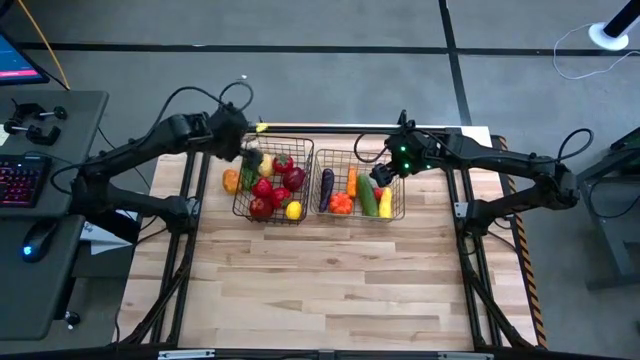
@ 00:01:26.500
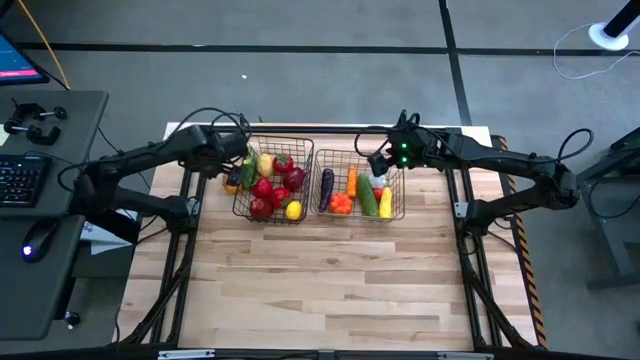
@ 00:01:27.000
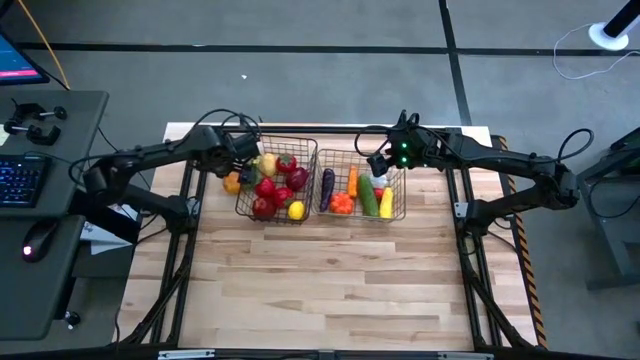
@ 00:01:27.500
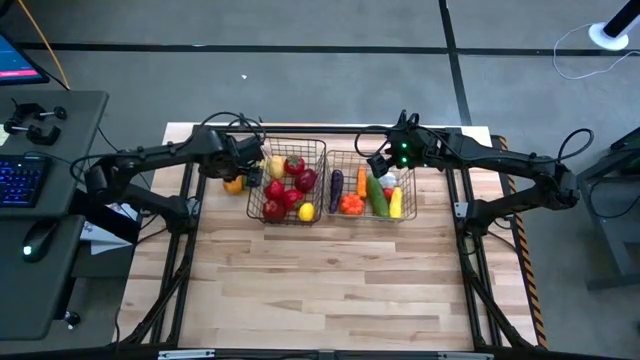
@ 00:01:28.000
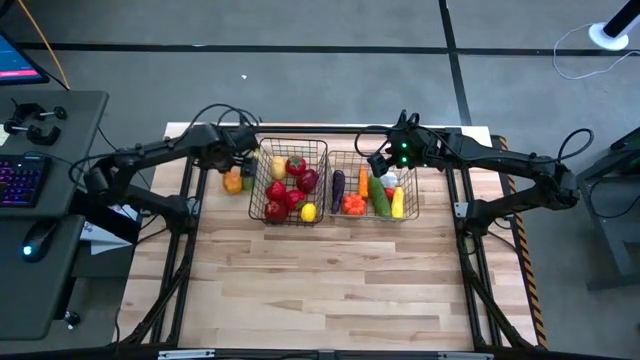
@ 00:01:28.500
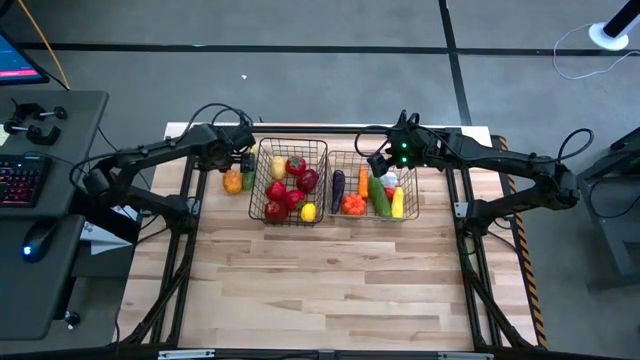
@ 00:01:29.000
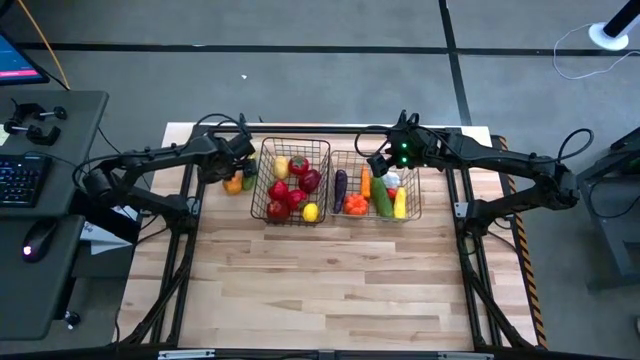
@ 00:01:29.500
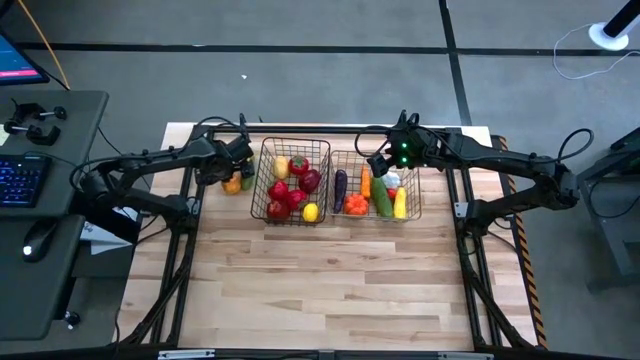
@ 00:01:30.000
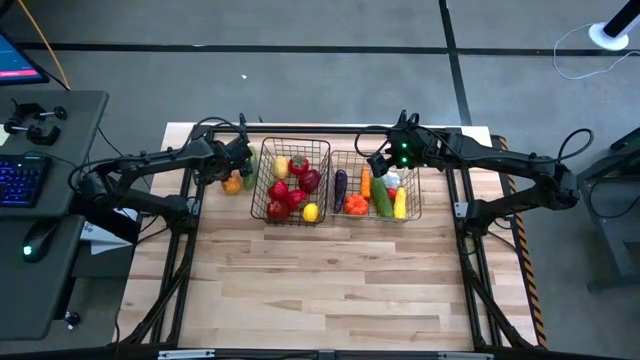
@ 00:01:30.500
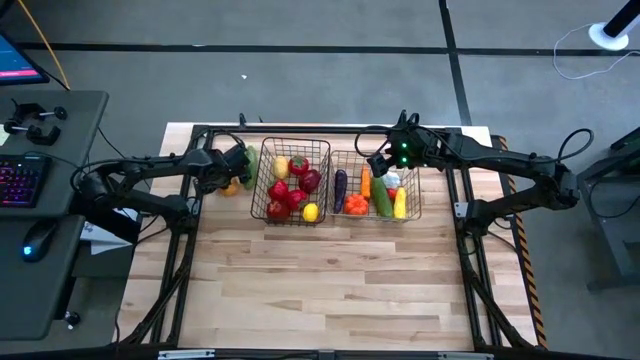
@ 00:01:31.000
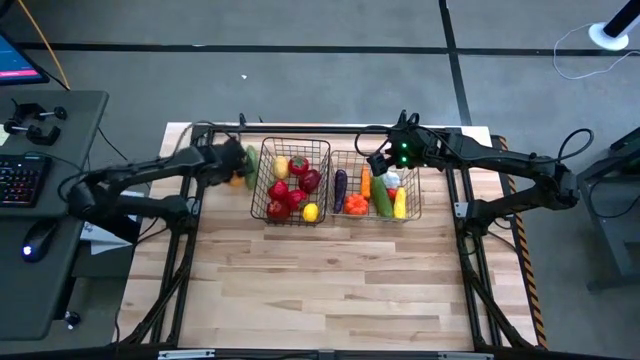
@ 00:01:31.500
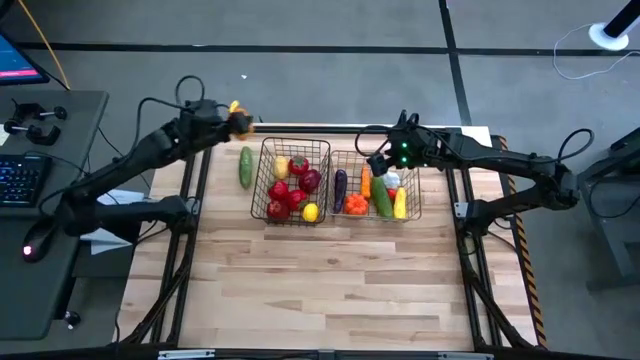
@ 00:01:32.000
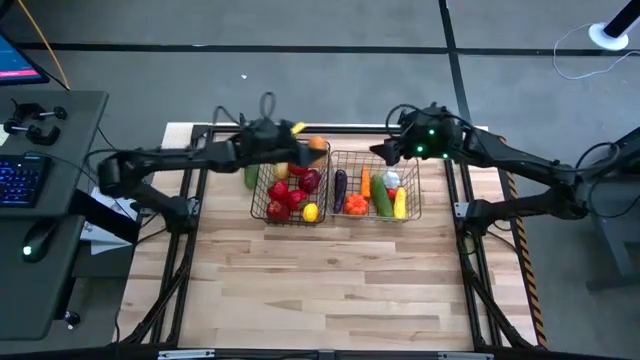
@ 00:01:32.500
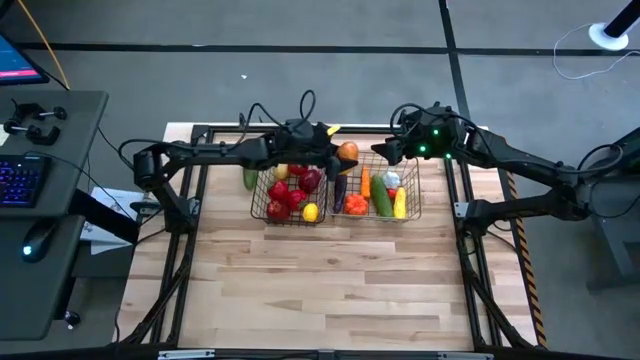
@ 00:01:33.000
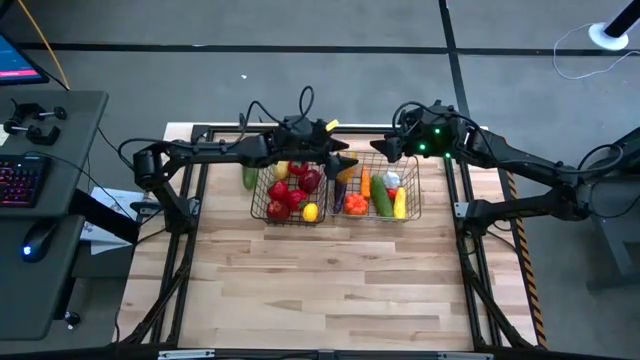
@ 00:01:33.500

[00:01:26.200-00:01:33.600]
Task: Sort produce into baskets
Put the potato into the right wire basket

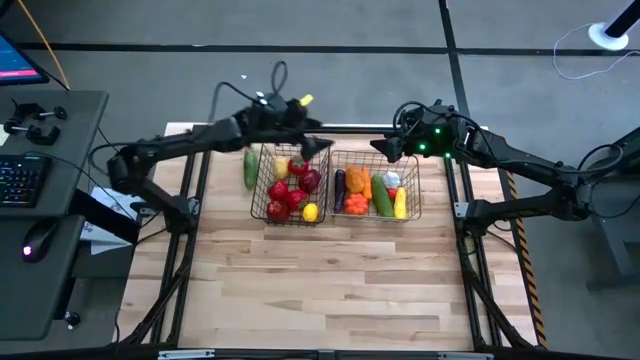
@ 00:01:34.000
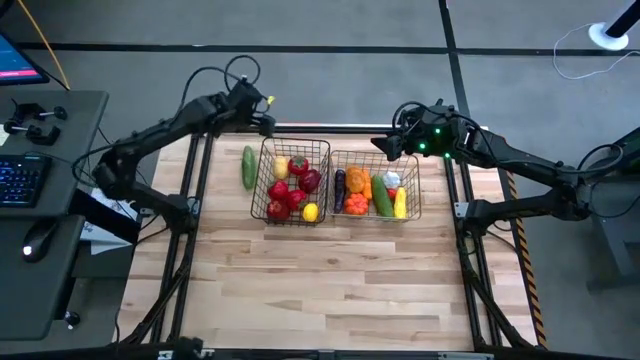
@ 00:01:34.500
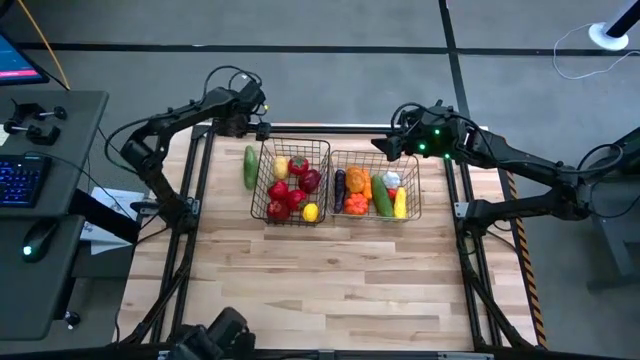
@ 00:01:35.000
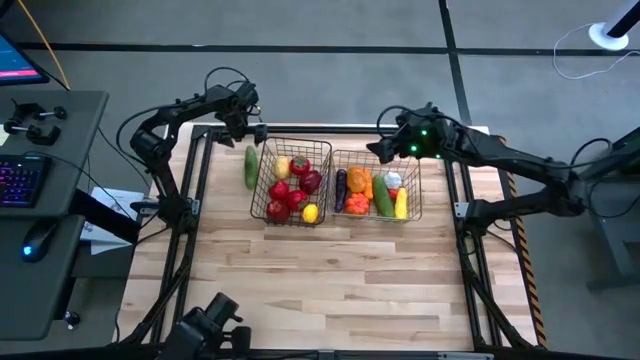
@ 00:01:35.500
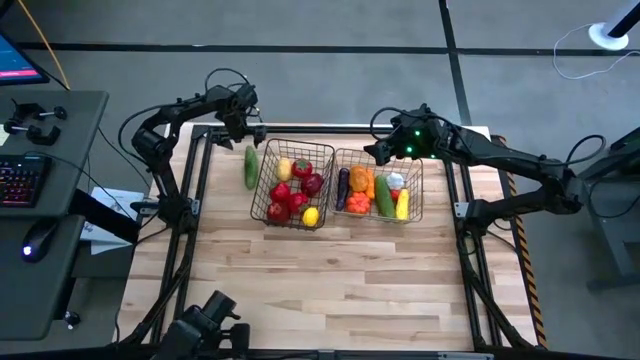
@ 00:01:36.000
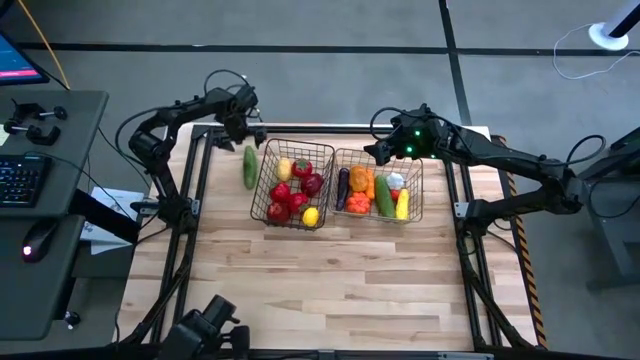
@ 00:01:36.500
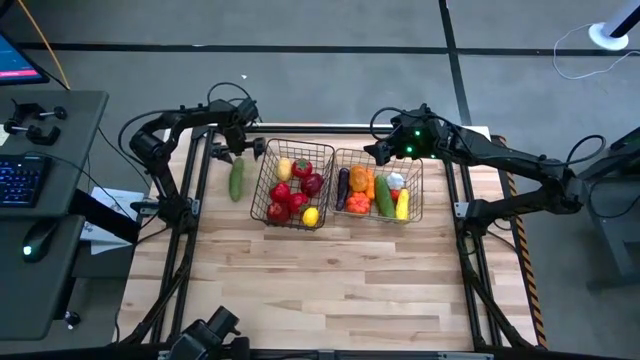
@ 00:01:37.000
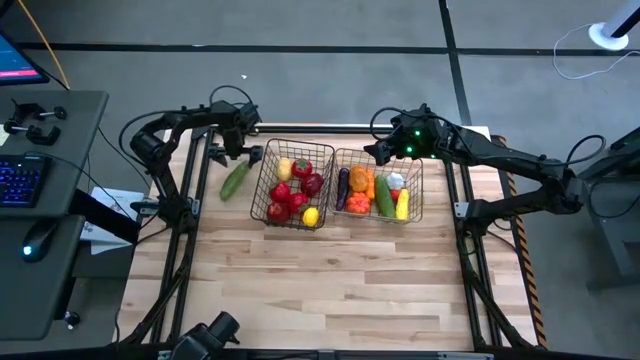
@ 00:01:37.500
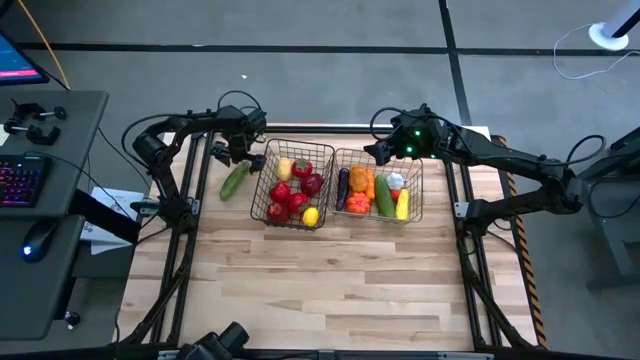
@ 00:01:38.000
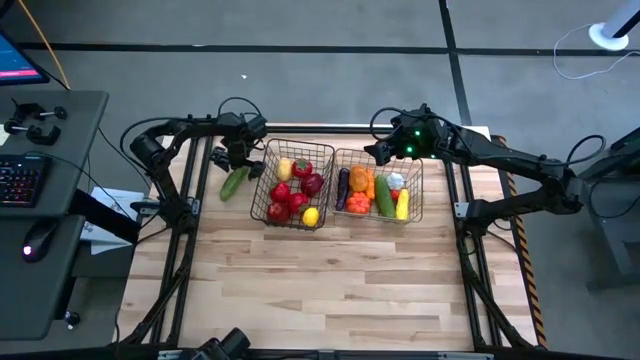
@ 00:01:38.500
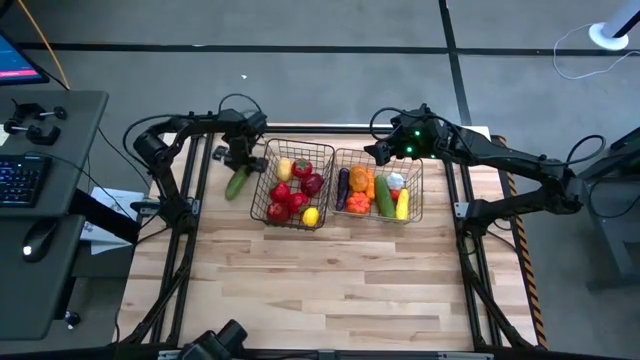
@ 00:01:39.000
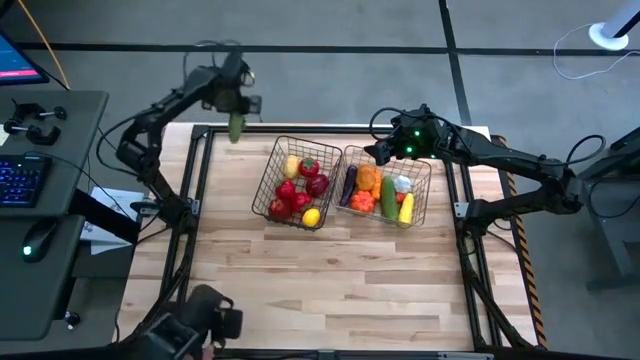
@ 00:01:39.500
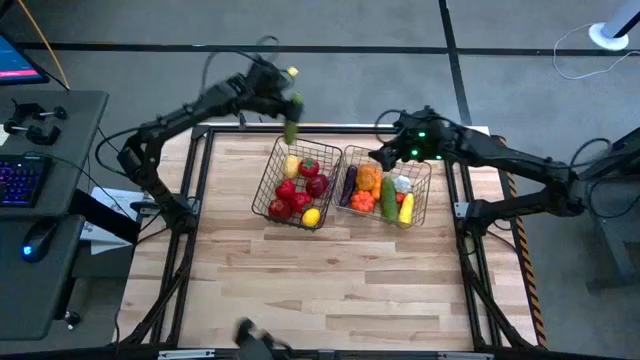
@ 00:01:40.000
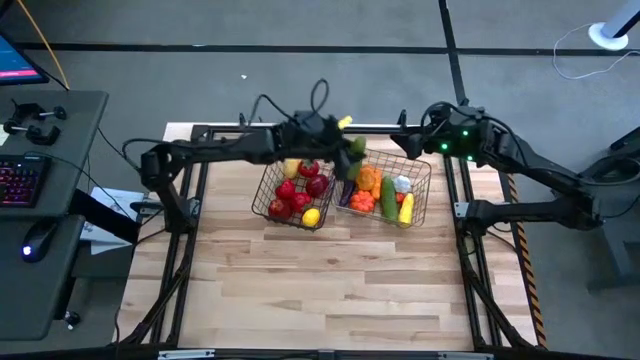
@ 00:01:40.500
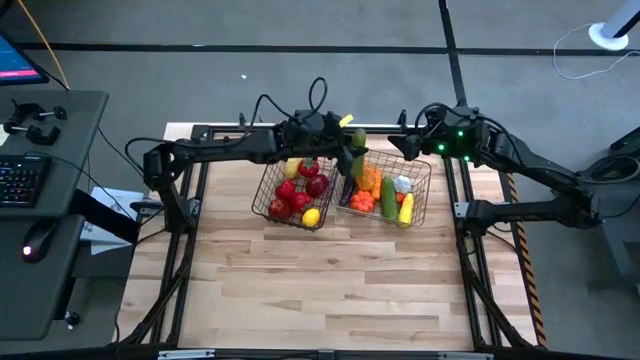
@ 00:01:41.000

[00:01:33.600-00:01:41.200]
Put the cucumber into the right wire basket

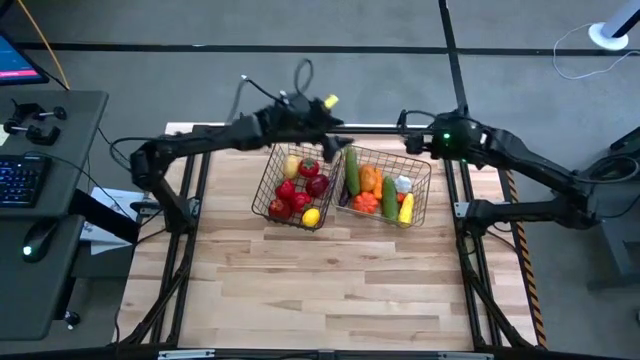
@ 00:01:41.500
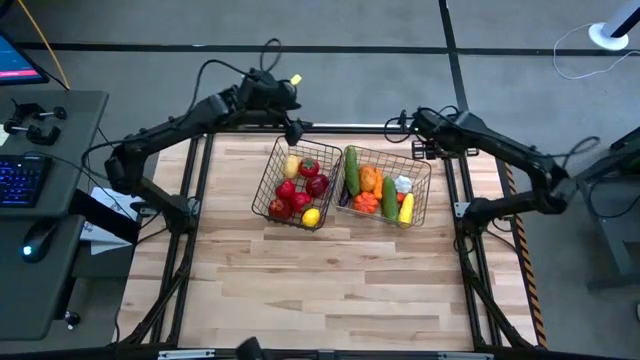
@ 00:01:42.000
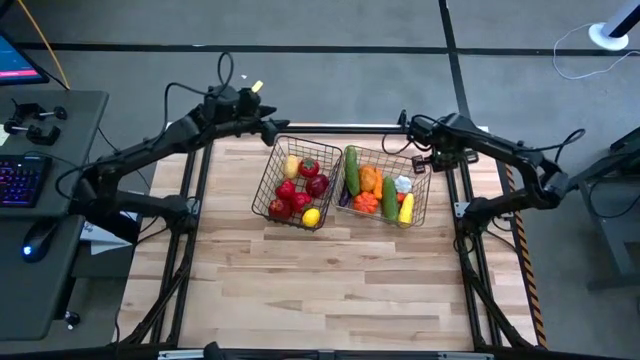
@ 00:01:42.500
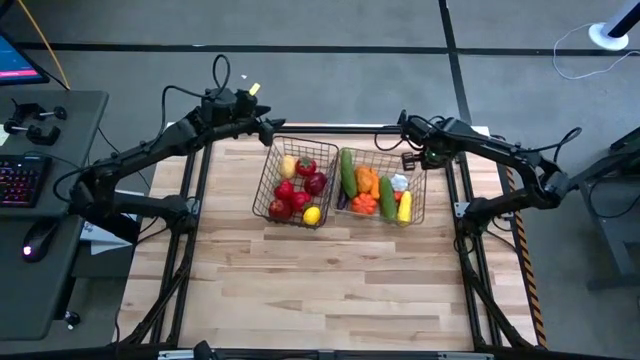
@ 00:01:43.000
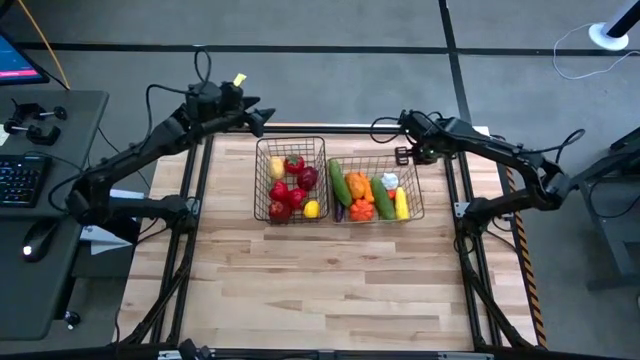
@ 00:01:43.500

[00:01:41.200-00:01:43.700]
Adjust the wire baskets

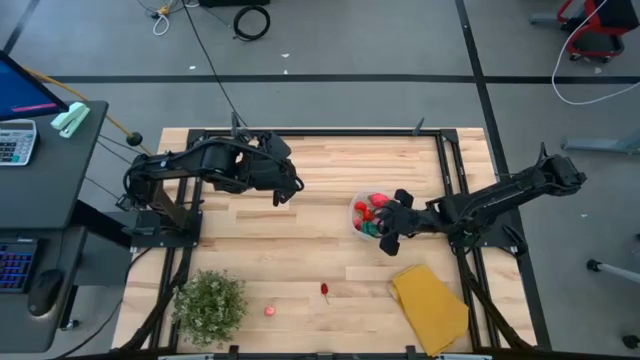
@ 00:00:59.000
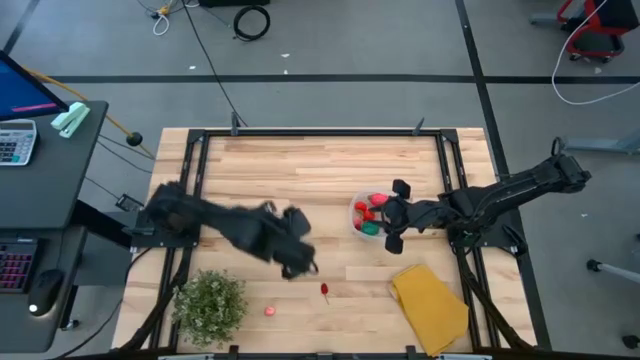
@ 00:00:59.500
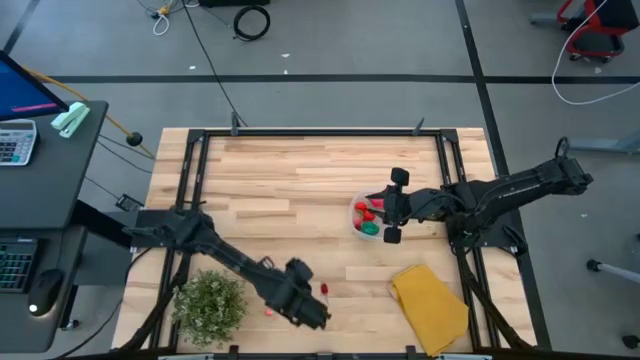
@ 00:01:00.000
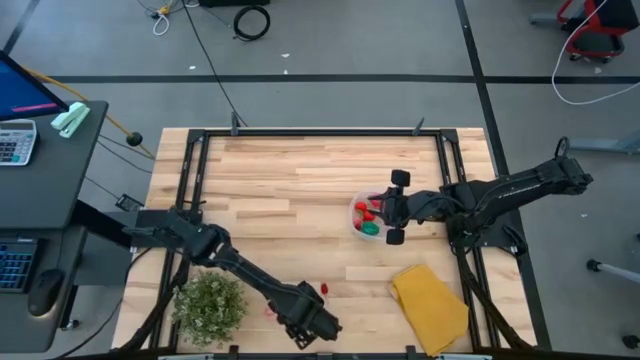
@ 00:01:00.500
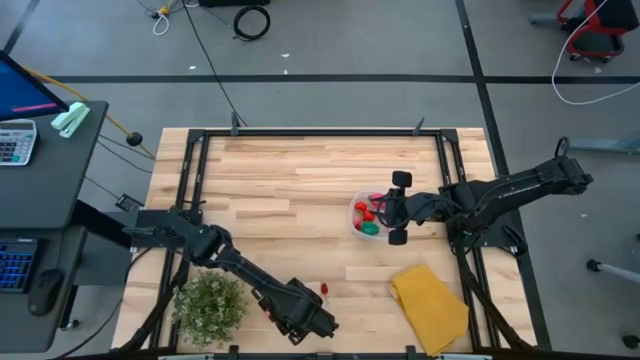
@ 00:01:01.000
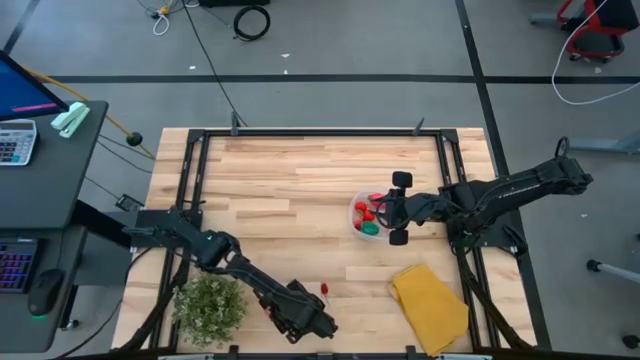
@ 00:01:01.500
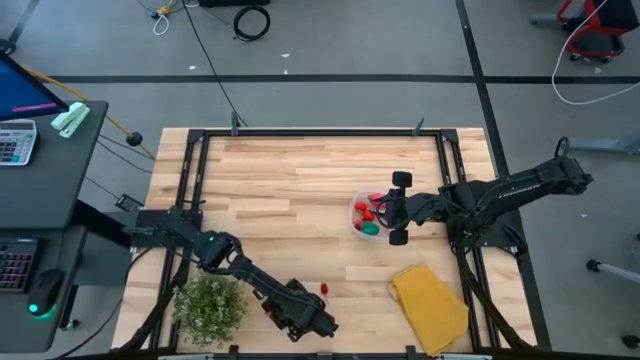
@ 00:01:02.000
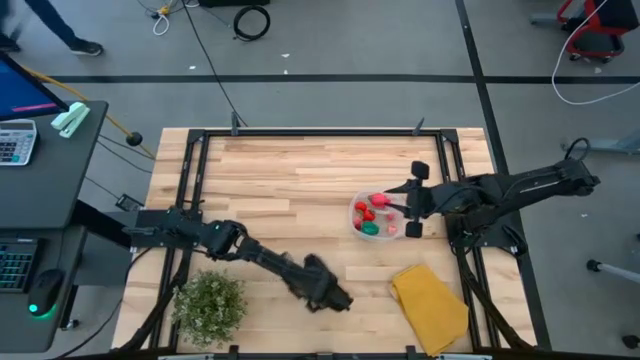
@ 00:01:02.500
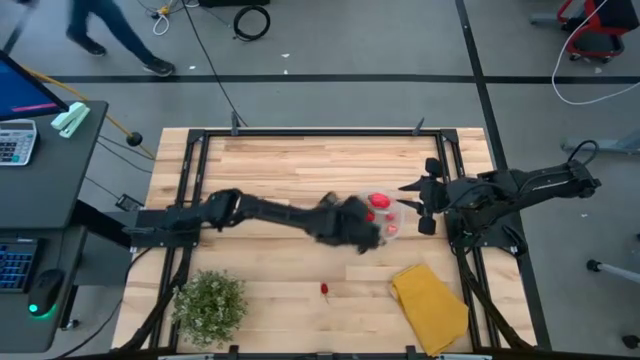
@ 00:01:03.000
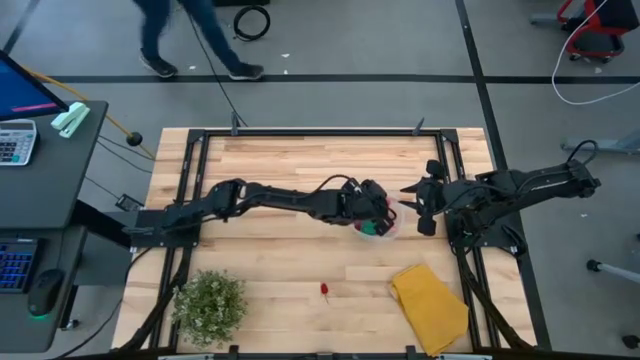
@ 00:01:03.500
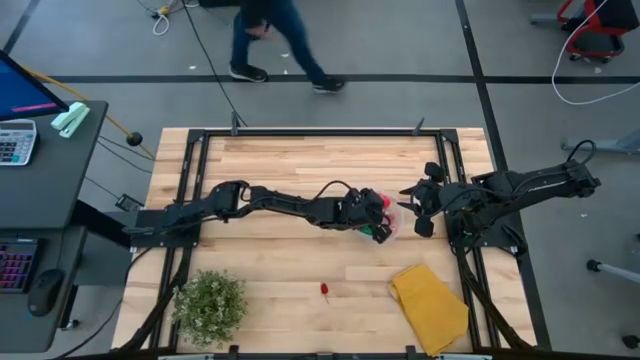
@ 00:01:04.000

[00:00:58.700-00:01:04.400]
Task: Pick and placing Produce into tupperware
Put the pink peach into the transparent container
